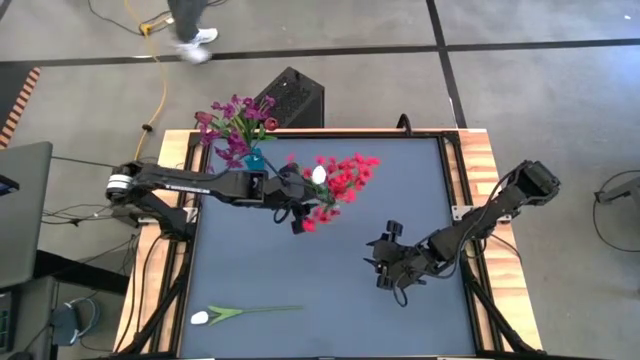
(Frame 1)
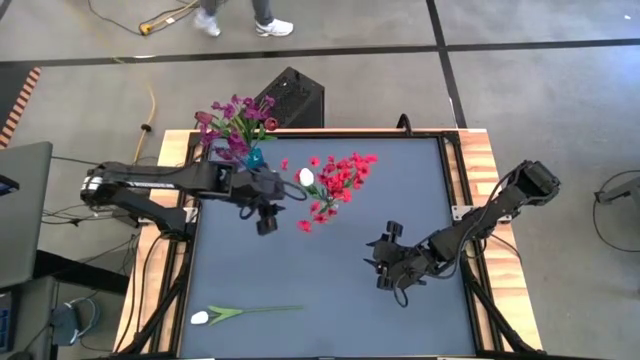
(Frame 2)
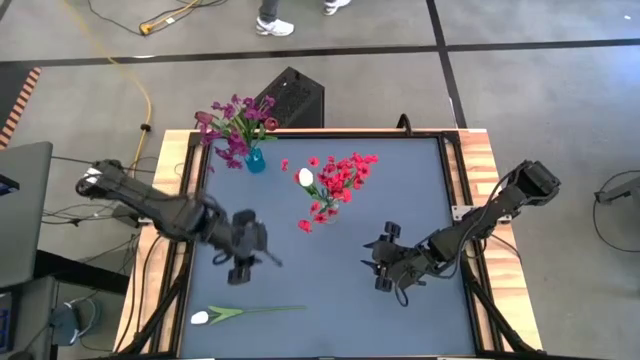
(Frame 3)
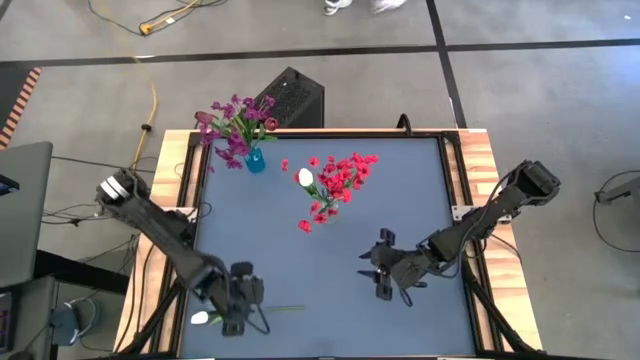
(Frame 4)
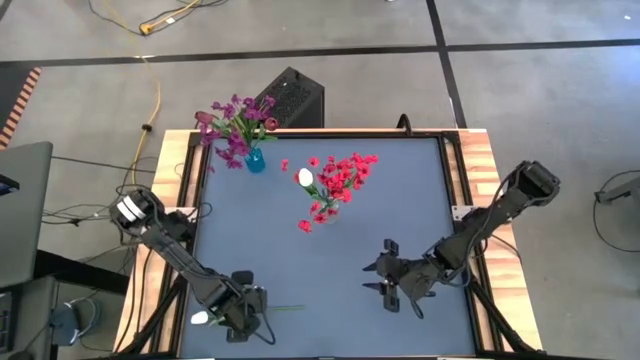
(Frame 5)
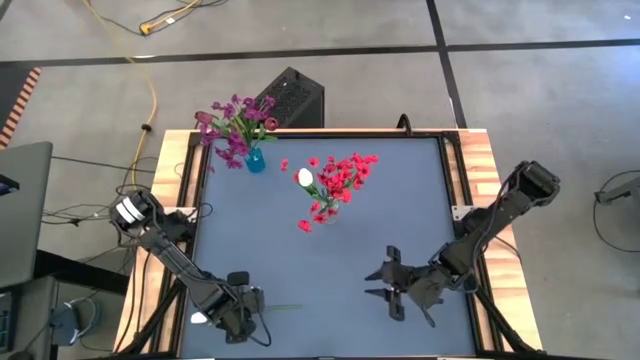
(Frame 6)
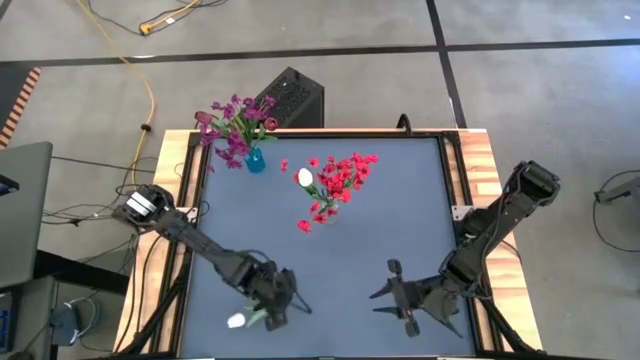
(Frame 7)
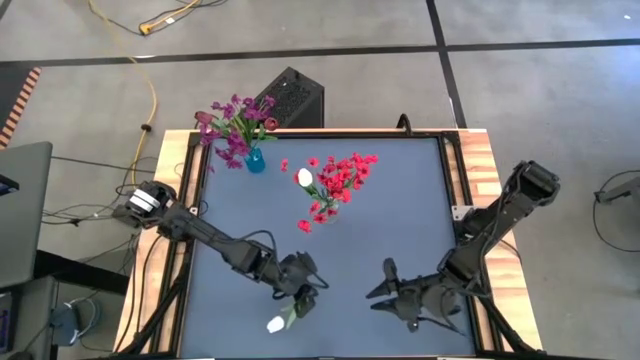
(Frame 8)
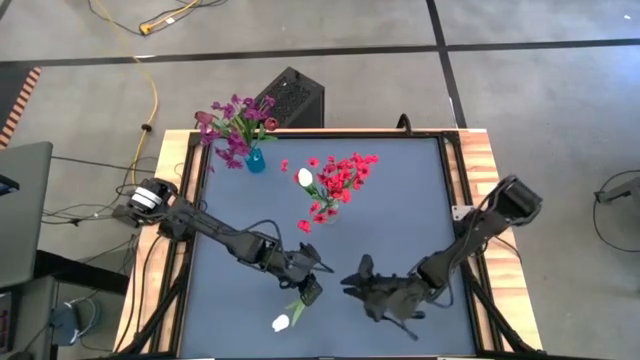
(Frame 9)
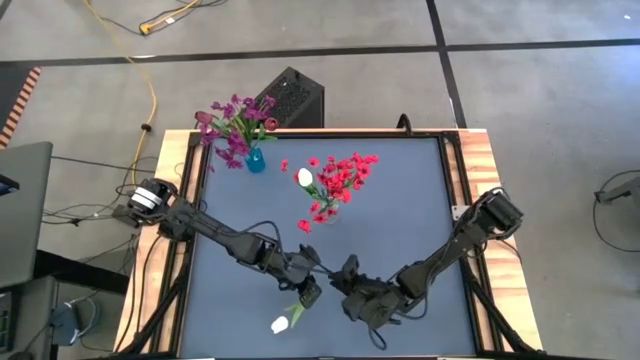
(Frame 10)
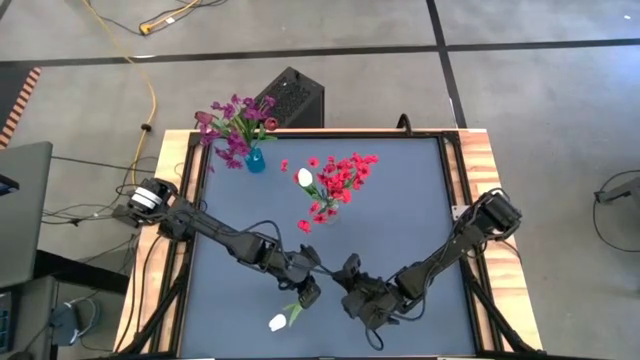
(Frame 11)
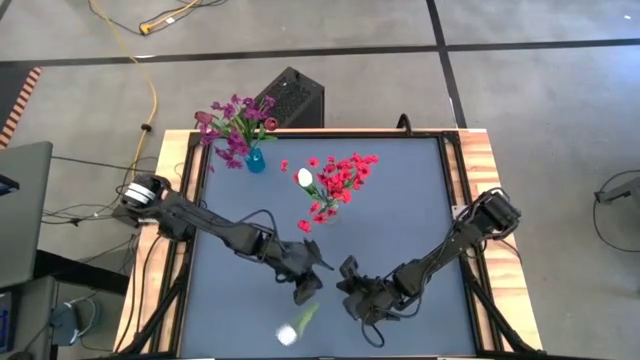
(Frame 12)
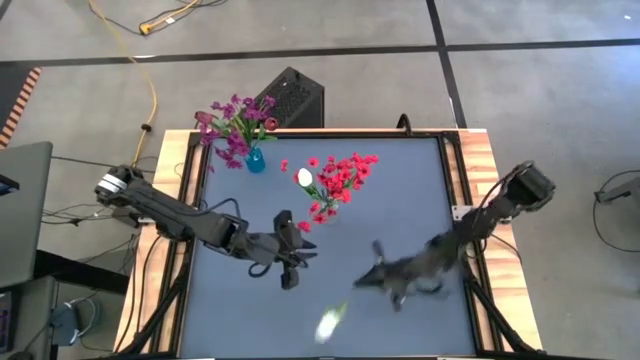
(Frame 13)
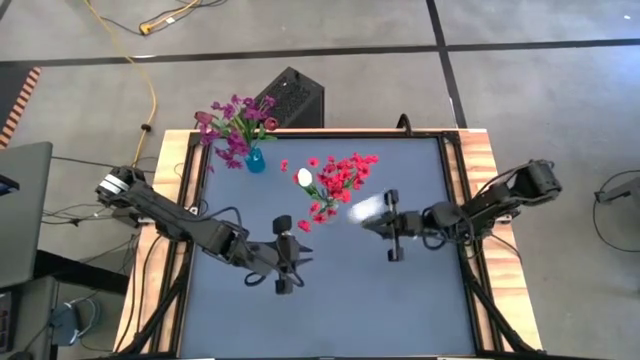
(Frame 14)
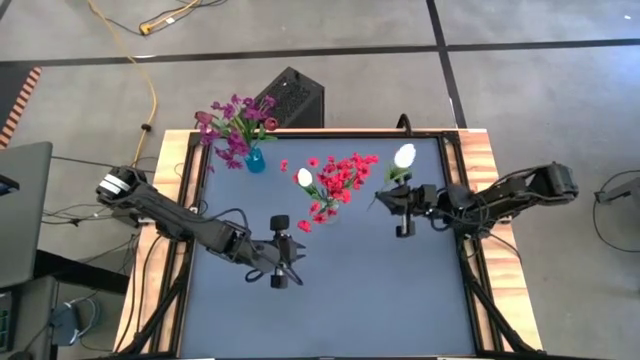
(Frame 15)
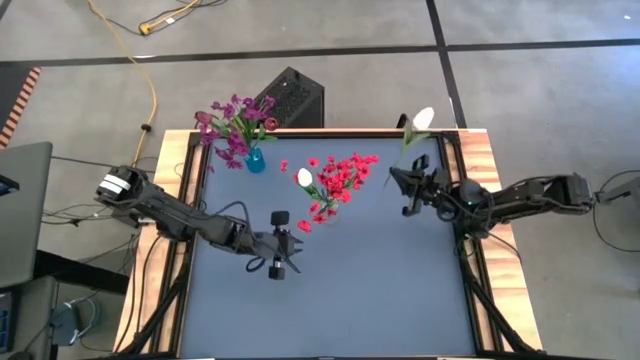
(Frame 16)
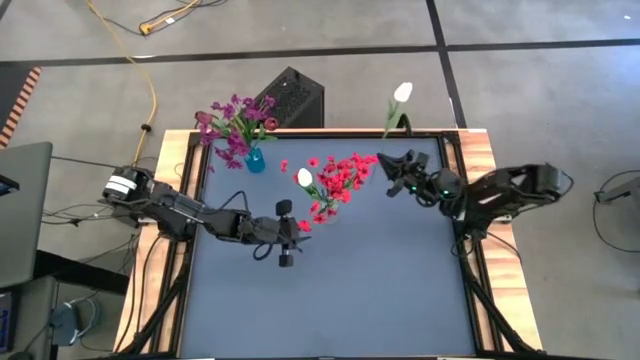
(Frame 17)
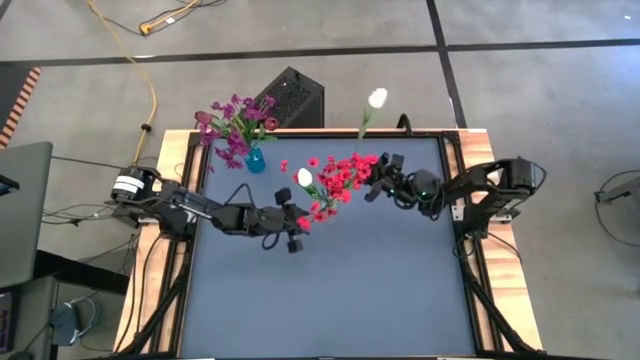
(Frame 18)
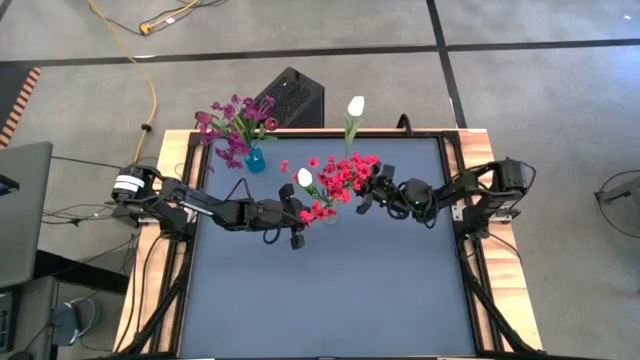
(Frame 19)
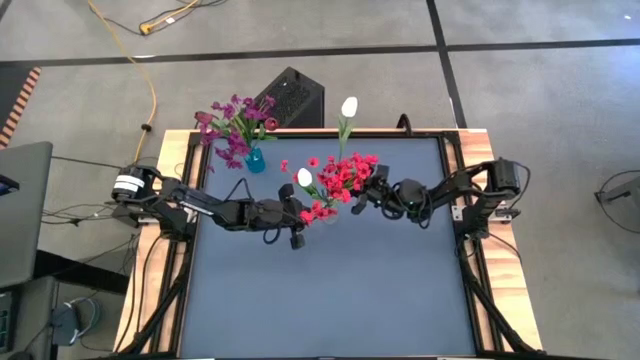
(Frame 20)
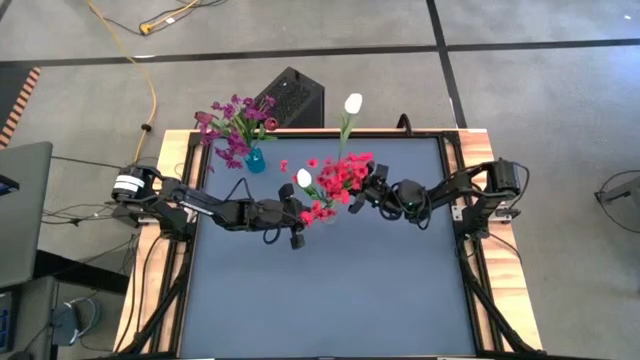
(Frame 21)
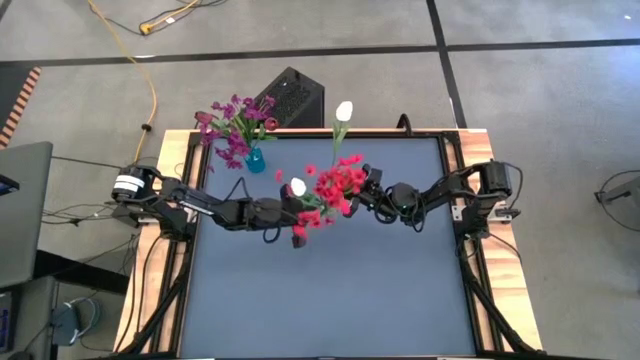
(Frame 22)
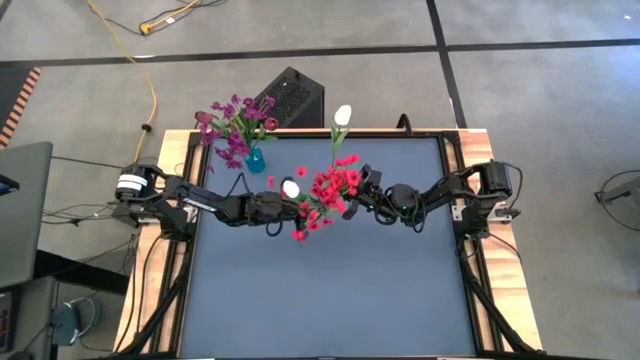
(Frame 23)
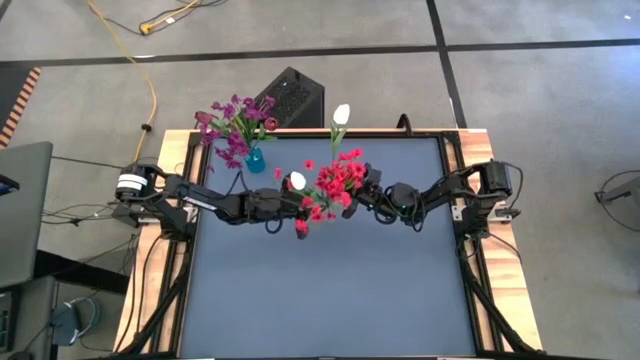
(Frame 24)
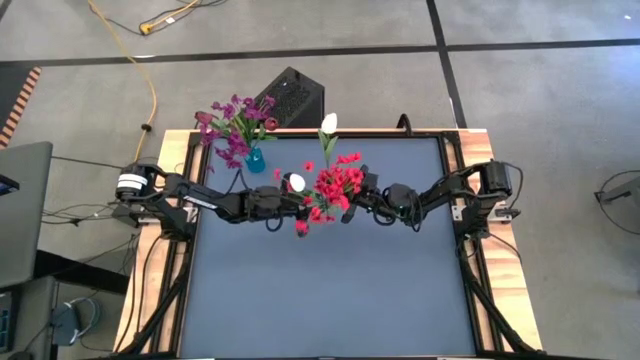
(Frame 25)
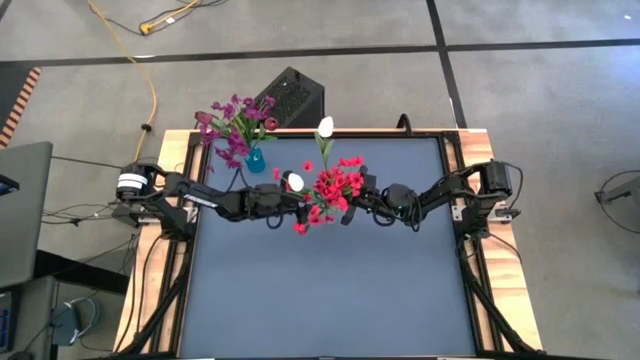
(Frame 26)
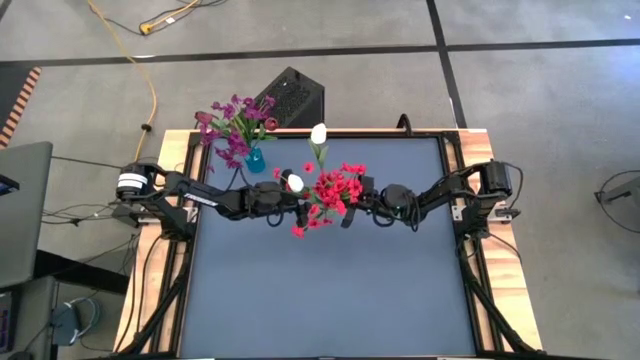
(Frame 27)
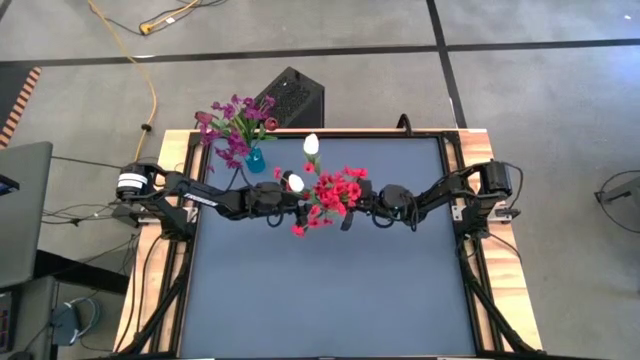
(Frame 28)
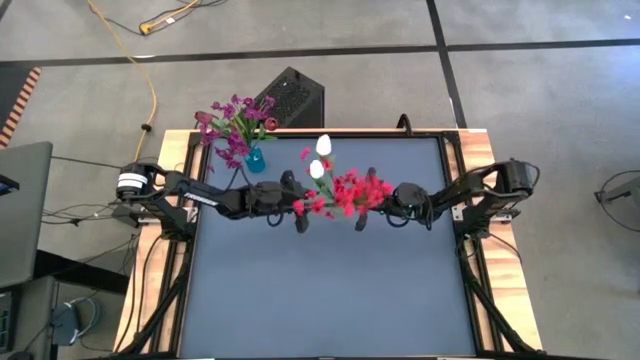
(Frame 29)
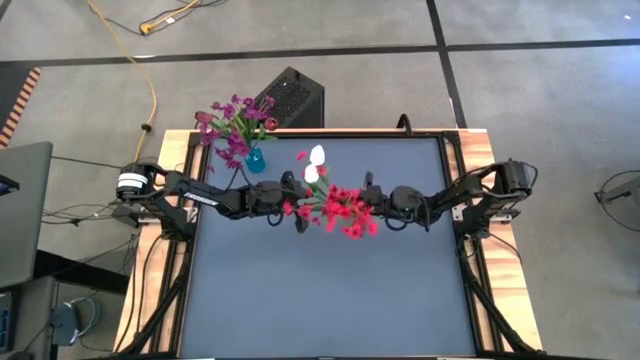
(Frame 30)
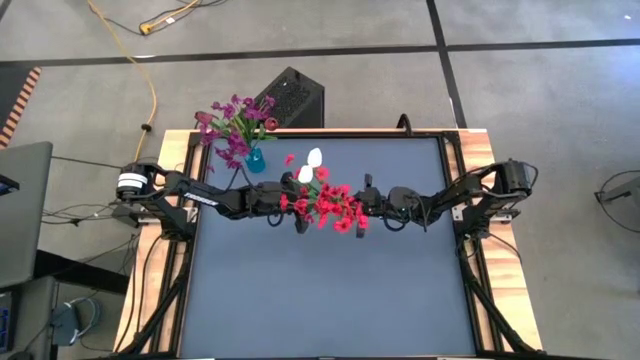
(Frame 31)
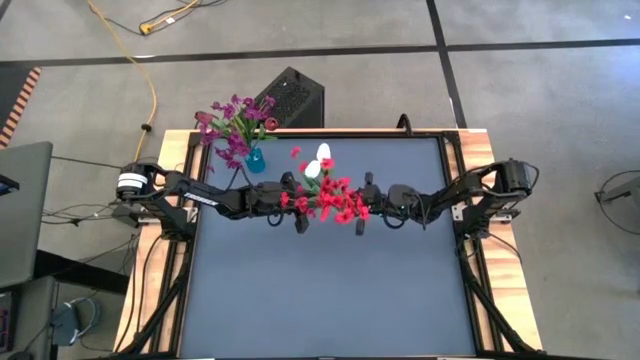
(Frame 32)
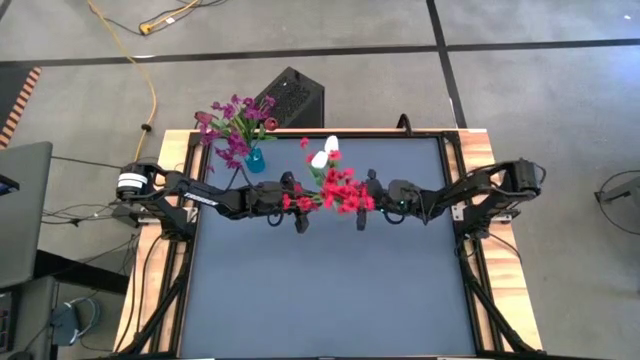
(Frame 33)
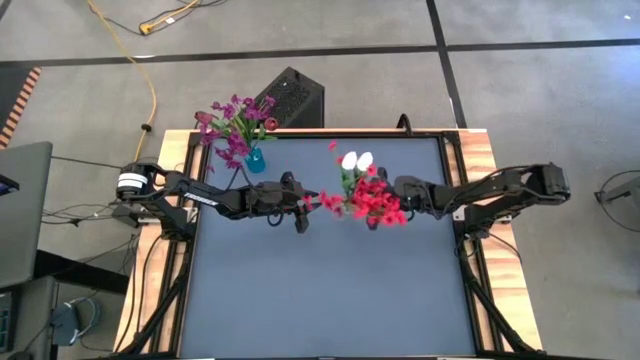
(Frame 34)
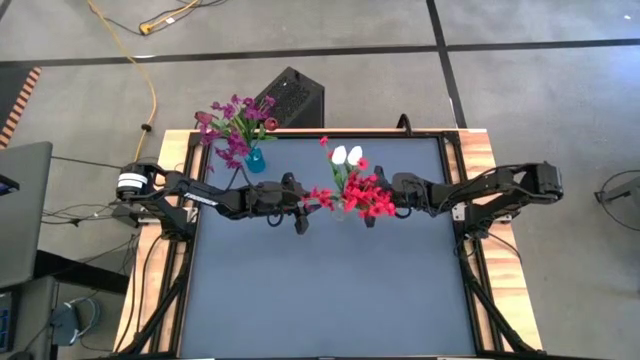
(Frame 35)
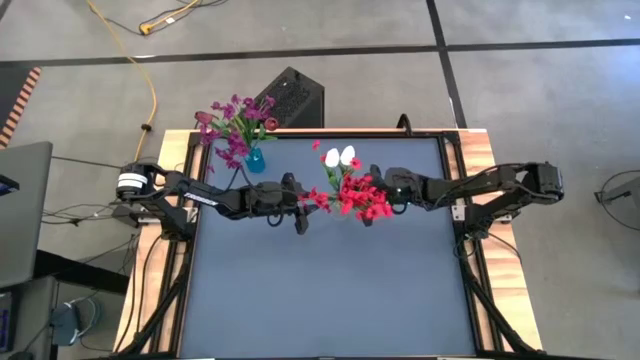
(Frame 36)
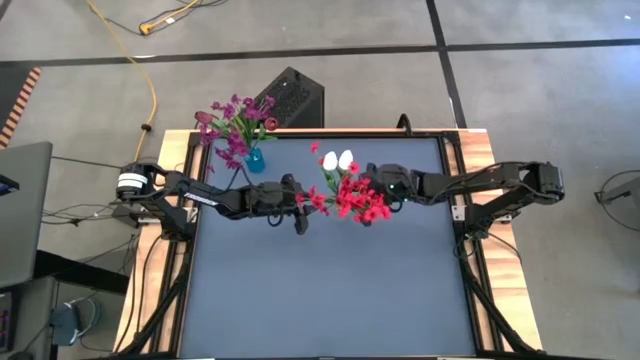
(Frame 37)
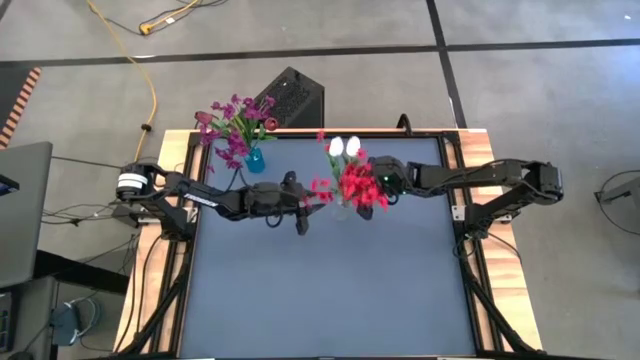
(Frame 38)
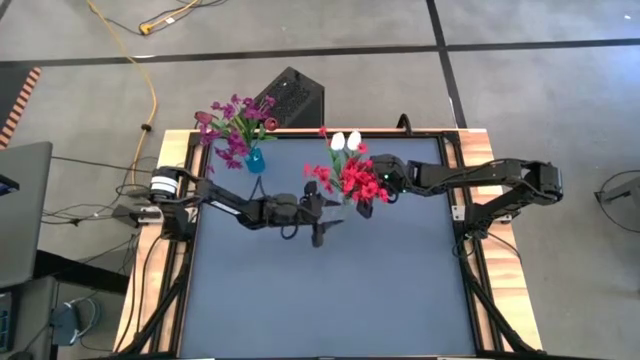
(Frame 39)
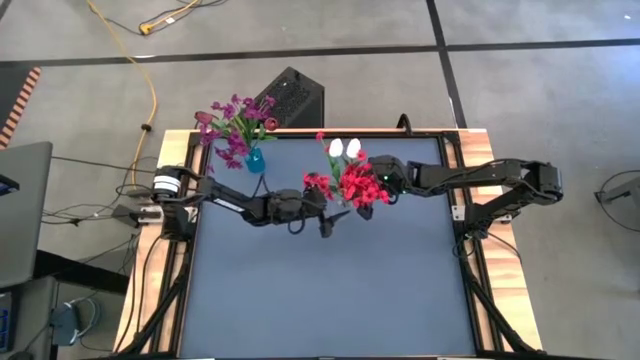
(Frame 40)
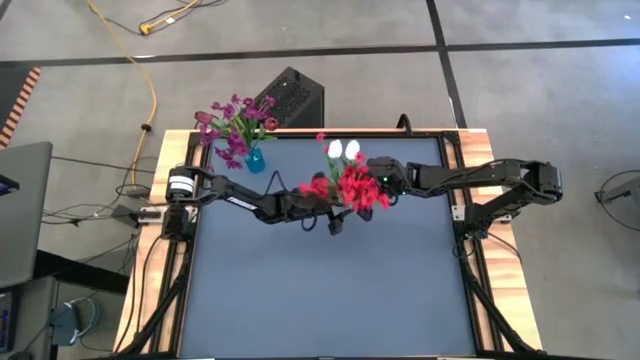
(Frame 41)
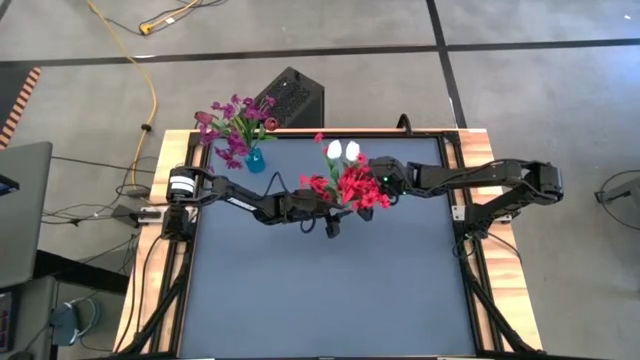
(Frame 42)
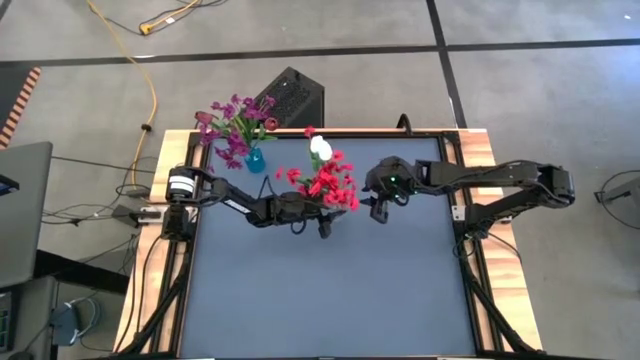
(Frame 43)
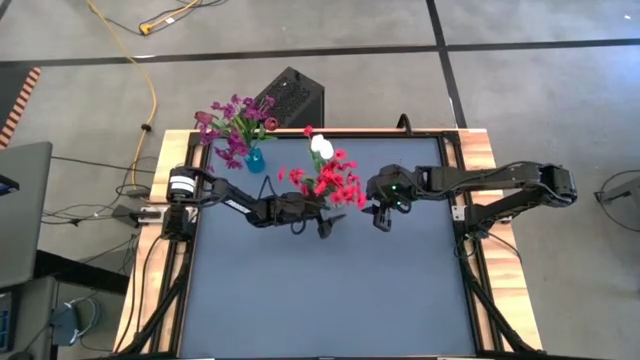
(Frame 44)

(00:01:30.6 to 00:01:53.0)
Task: Sort flowers into vase by color
Put the white tulip into the transparent vase
